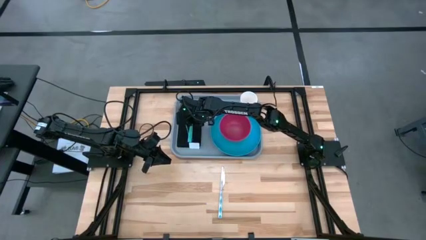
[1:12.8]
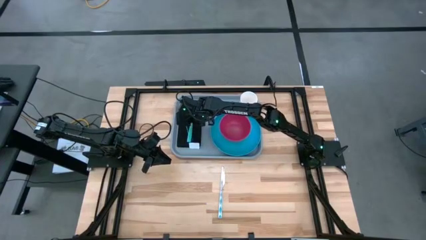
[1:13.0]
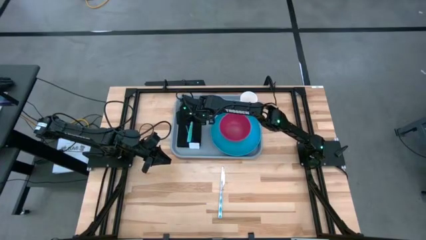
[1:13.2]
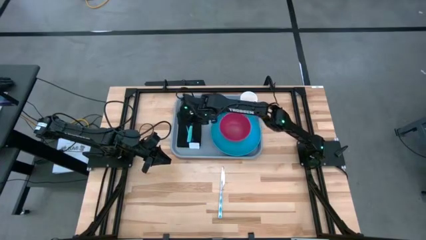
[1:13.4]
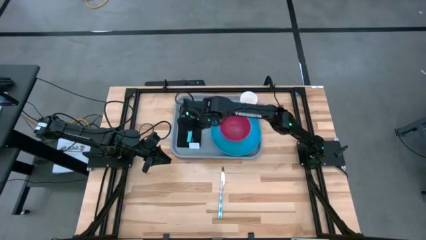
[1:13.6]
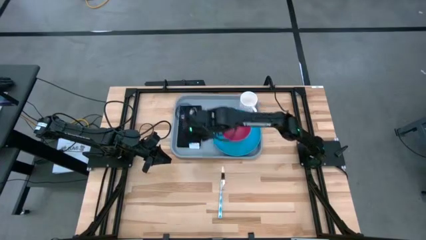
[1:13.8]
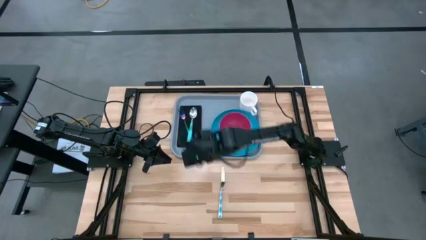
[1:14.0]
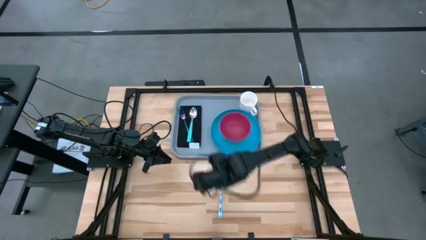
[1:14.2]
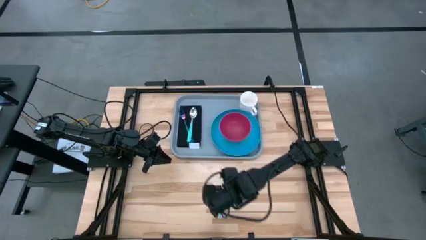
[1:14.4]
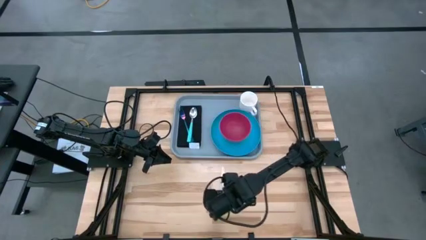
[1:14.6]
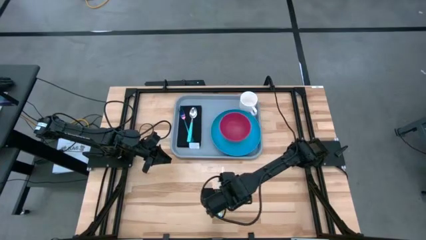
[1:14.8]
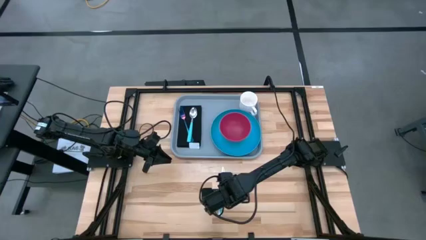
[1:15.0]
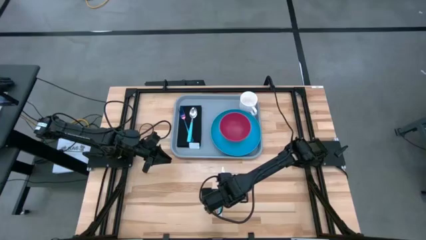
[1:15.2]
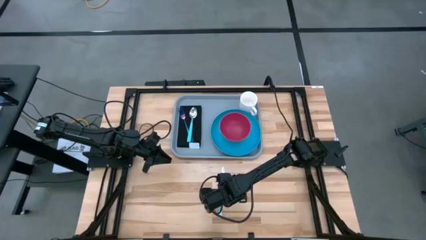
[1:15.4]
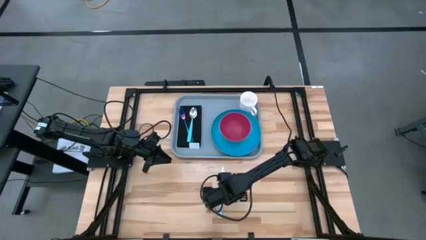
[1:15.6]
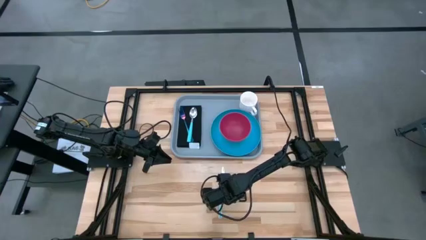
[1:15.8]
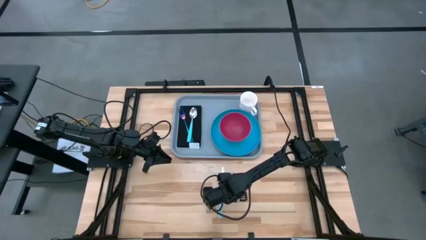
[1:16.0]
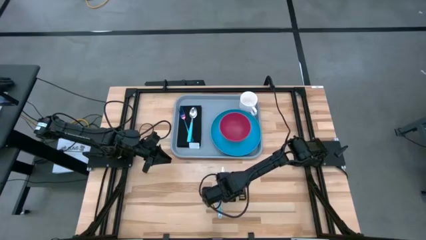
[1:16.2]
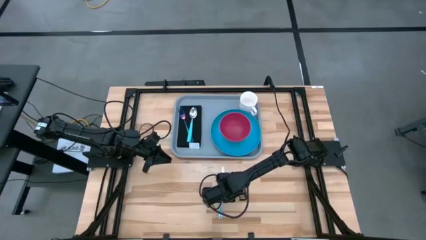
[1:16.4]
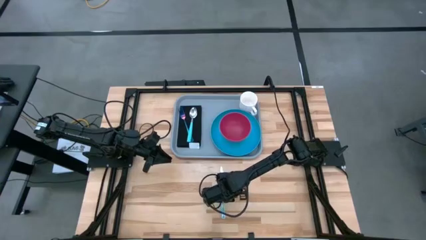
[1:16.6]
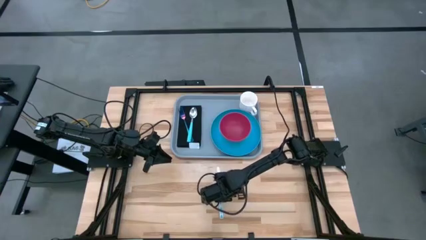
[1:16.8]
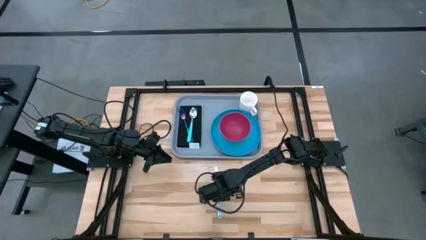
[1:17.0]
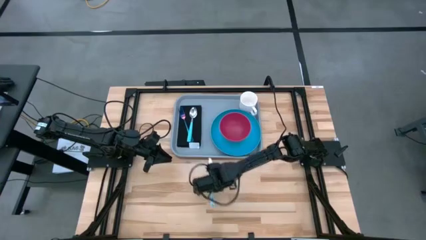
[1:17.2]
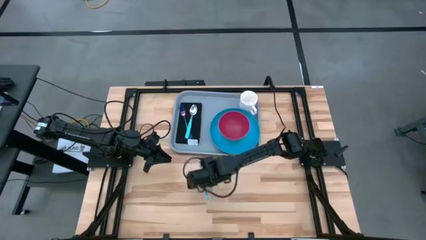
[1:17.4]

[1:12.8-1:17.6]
Task: Set up tray
Put the white patterned knife on top of the black napkin

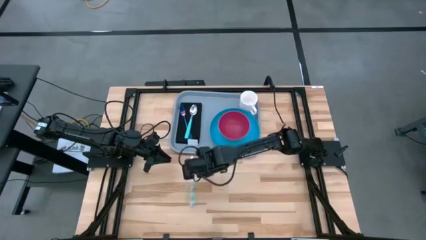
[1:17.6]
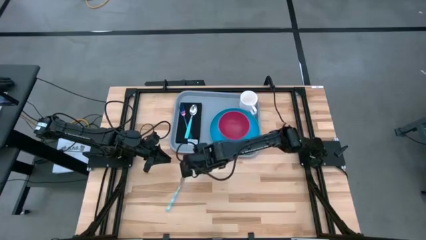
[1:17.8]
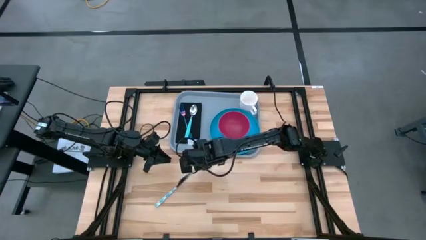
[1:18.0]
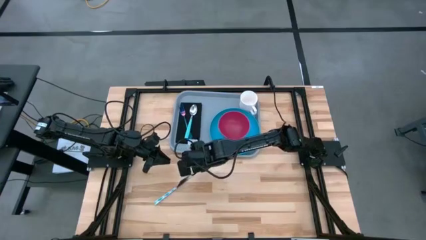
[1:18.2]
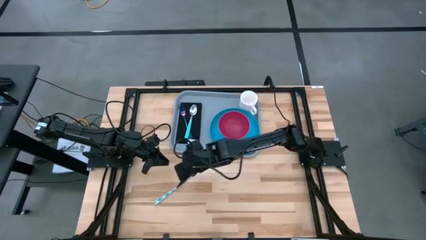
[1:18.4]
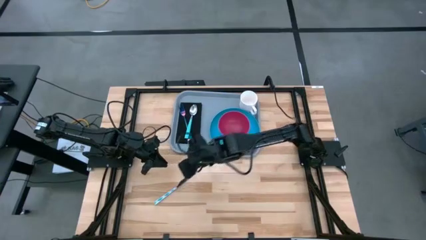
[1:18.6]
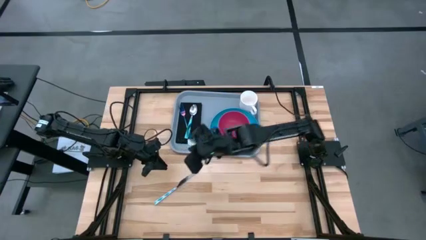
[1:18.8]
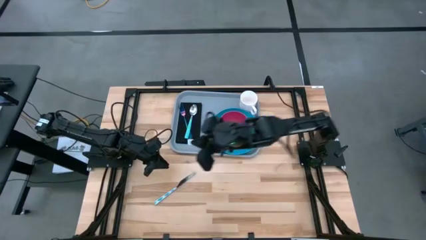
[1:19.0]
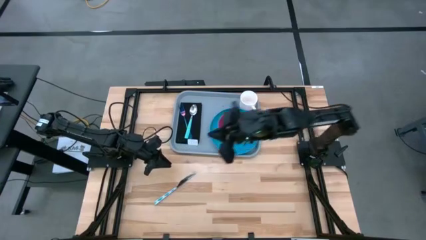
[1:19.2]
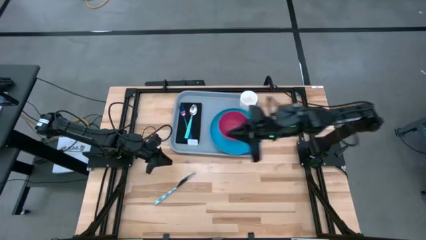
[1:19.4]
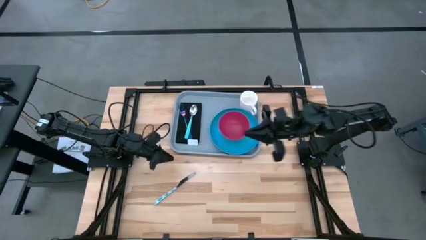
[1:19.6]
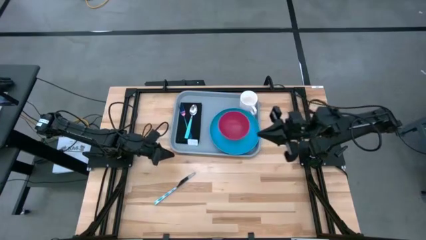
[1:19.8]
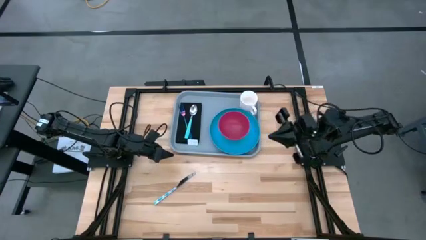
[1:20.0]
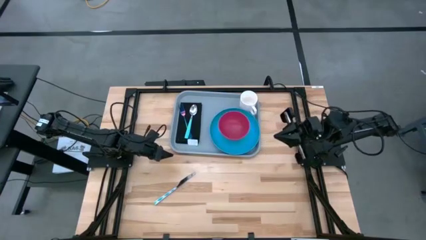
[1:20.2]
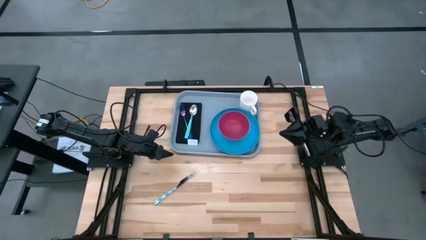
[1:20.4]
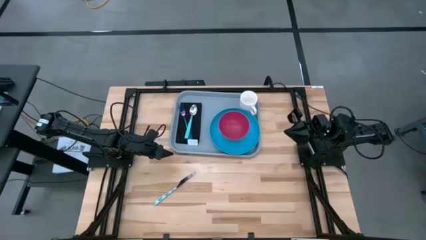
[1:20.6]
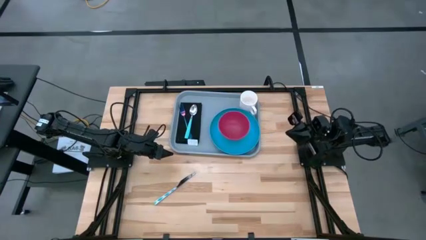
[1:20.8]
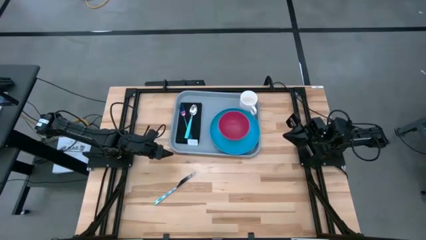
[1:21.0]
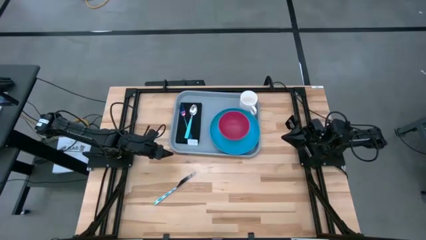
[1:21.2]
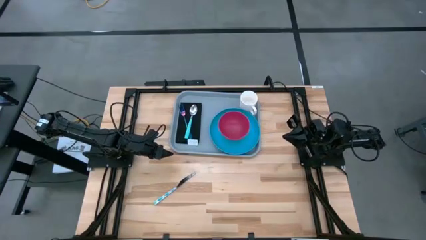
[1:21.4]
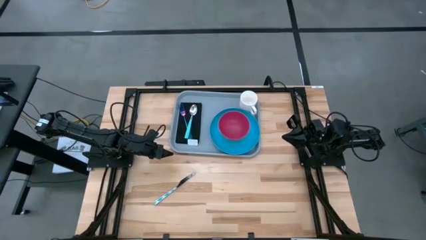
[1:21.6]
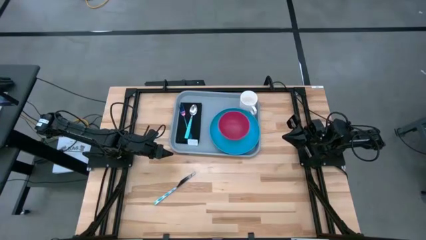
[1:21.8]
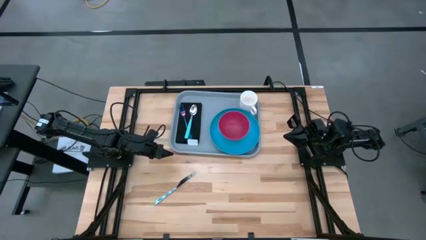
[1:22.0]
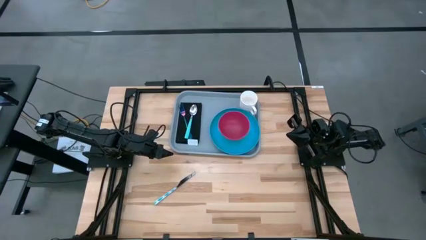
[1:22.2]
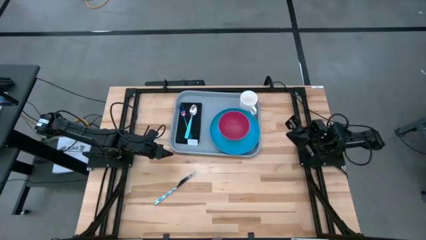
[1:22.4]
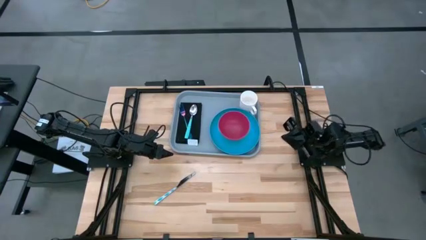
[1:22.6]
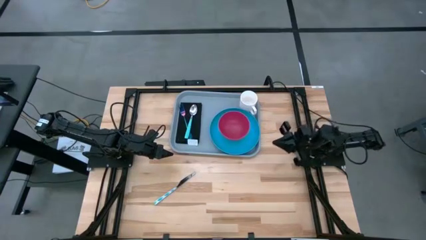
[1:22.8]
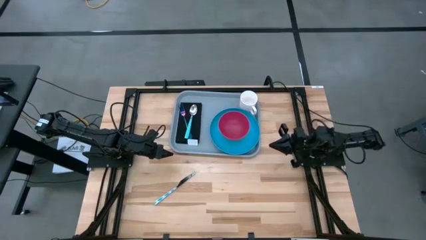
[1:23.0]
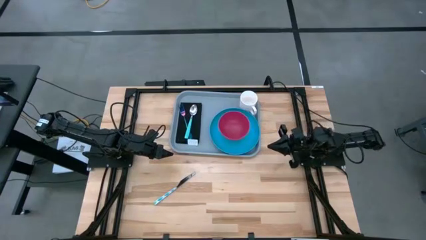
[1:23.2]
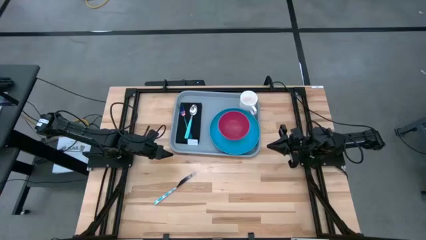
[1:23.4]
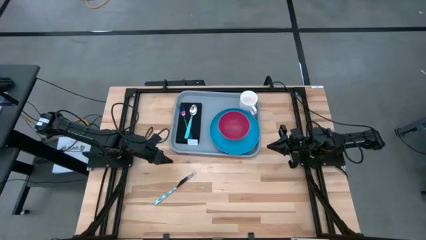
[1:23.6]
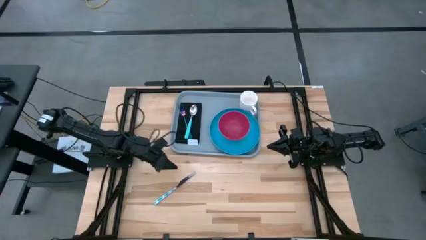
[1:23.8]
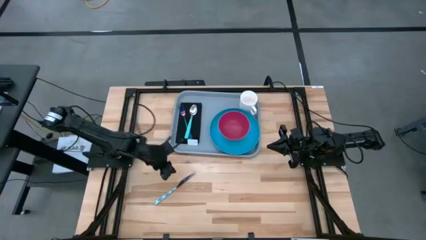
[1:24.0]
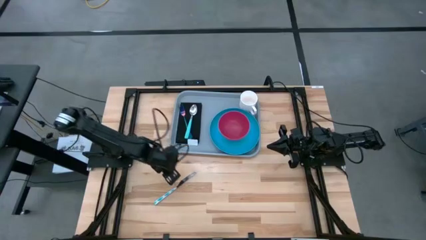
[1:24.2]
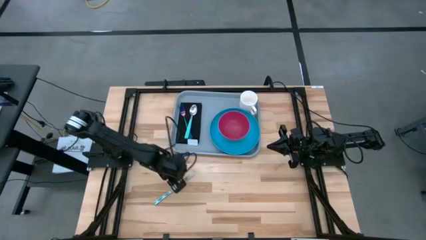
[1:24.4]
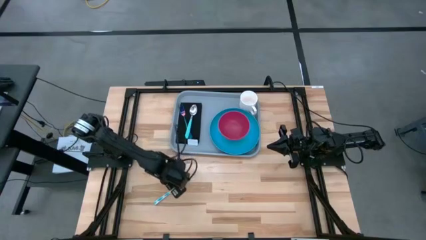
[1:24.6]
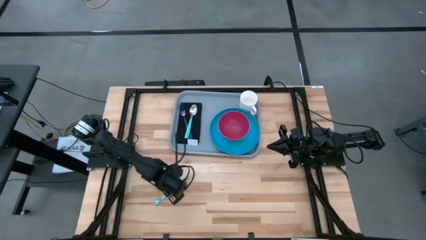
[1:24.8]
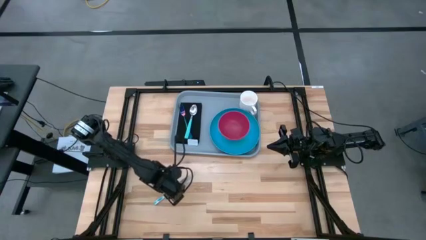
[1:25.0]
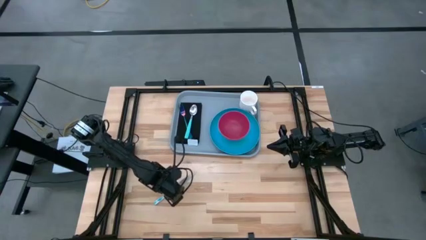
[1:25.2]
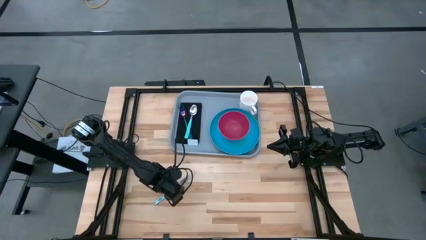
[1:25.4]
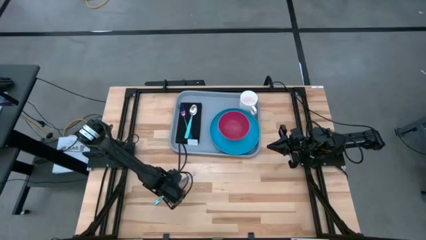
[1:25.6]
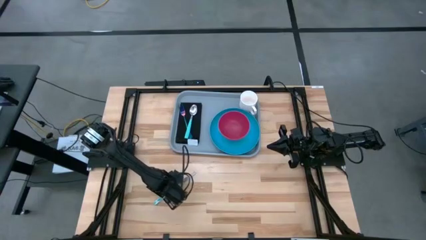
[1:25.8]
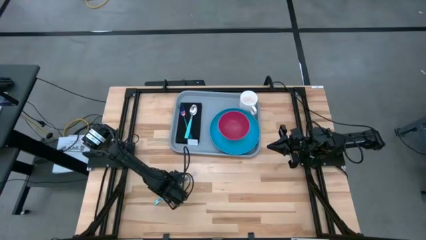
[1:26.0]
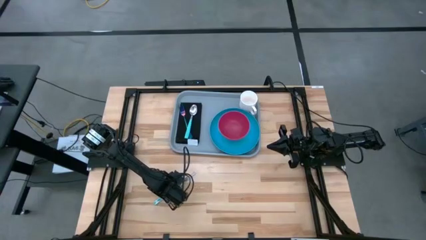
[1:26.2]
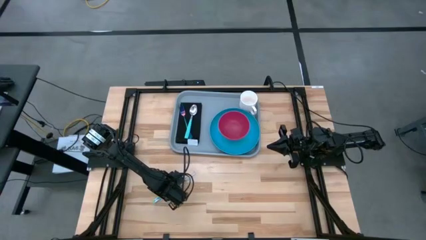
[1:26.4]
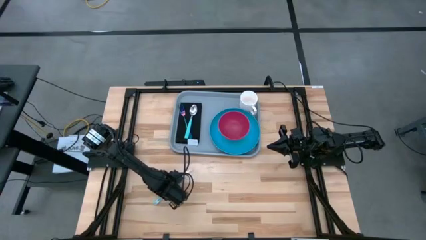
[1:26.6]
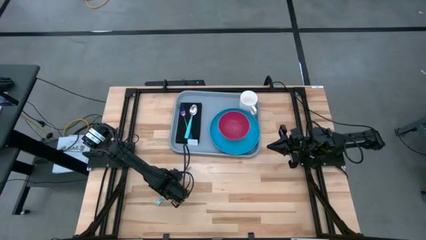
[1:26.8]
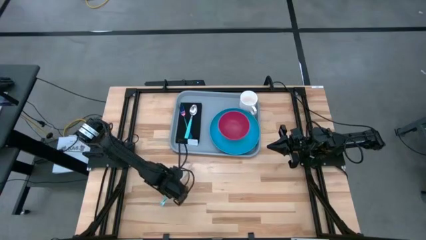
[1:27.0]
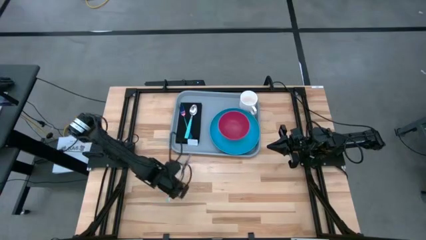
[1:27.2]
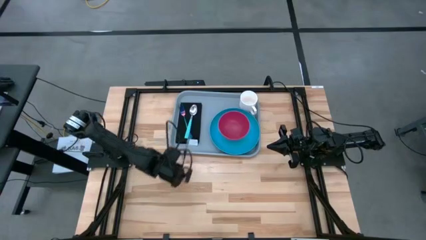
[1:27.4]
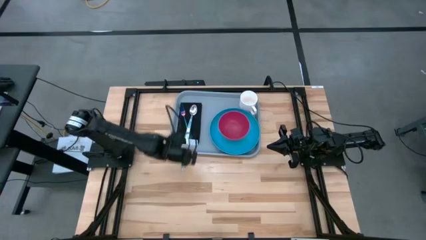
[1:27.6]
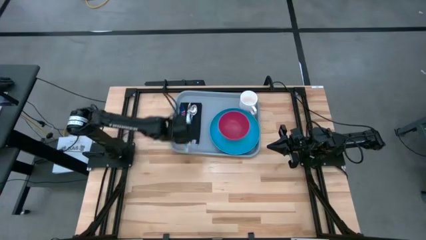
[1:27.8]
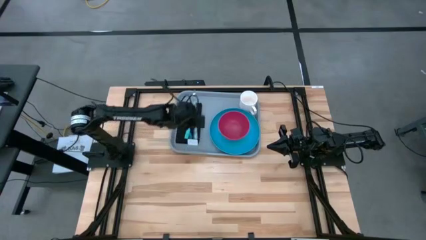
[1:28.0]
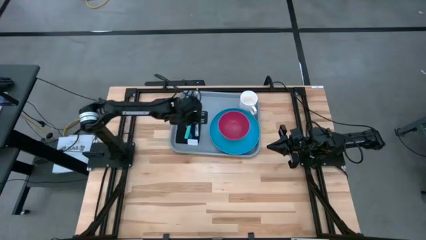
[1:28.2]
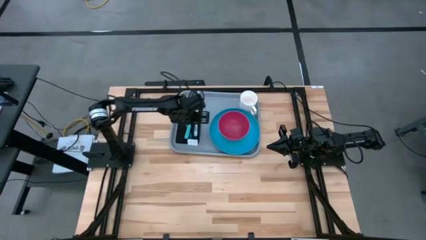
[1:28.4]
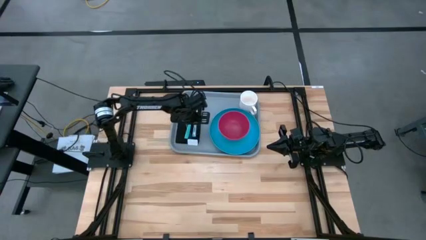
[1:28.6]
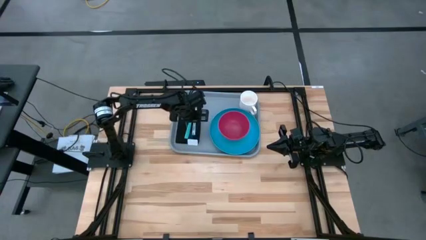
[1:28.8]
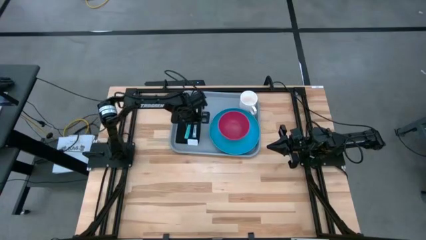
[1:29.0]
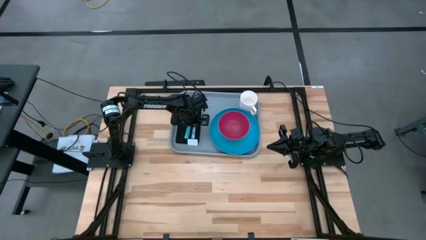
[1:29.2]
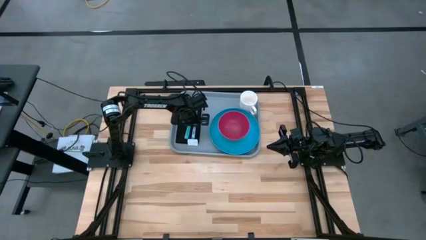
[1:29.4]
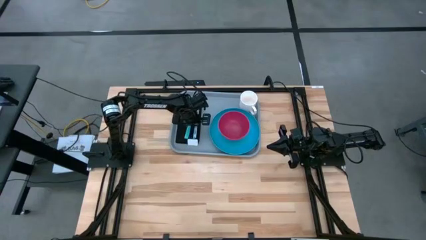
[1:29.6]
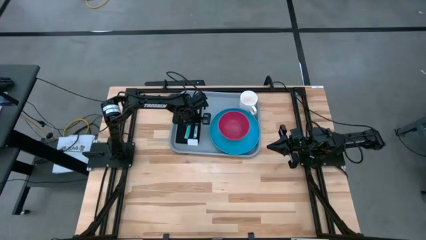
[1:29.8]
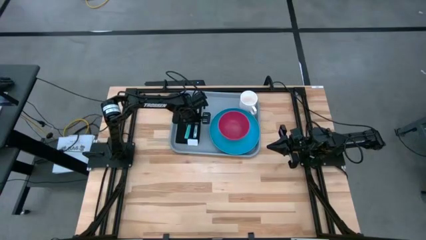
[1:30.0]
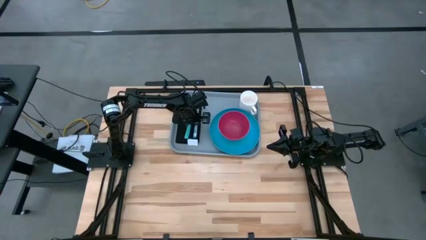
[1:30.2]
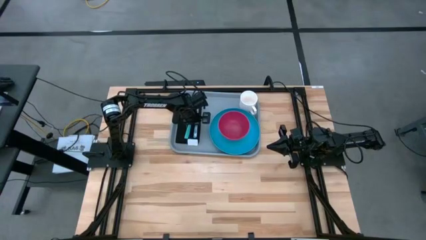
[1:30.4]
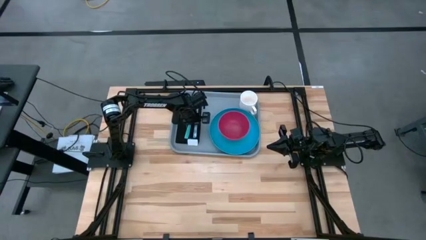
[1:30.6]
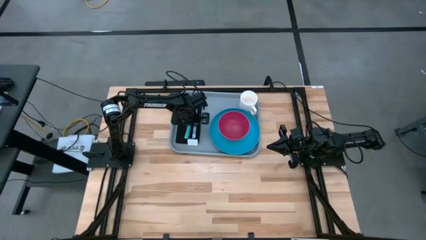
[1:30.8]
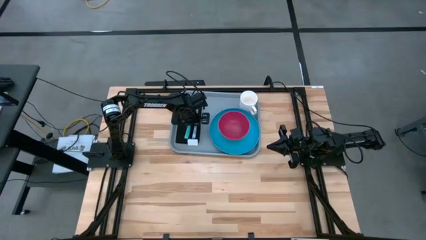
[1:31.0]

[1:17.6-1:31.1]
Put the white patterned knife on top of the black napkin
